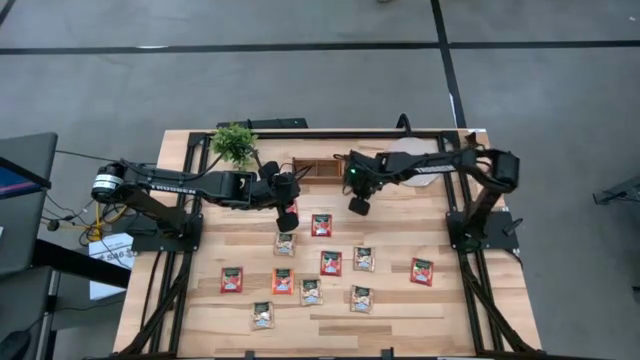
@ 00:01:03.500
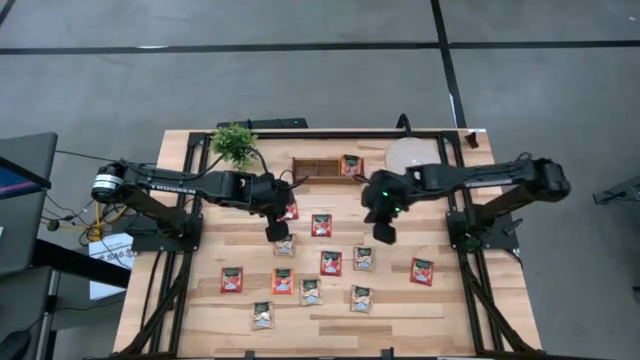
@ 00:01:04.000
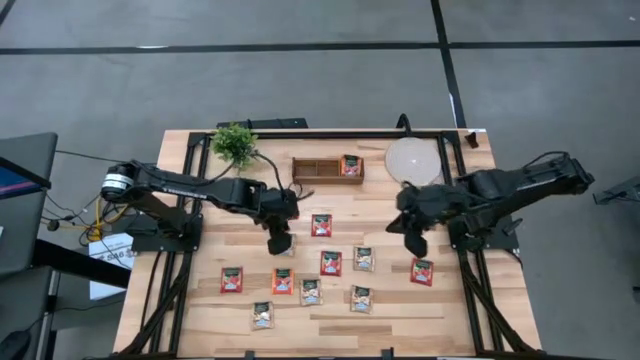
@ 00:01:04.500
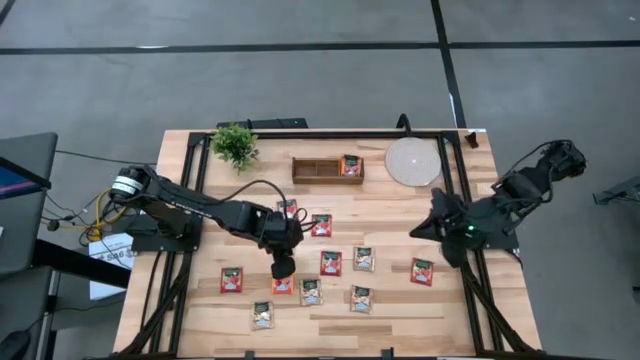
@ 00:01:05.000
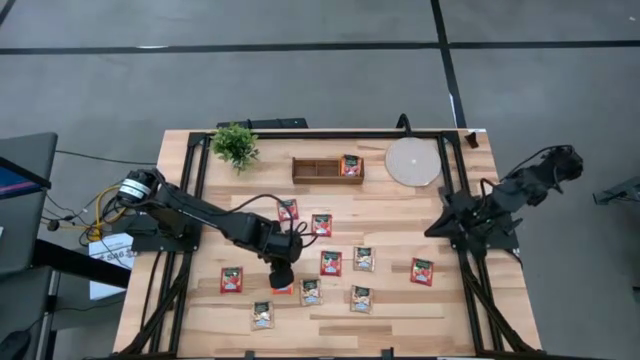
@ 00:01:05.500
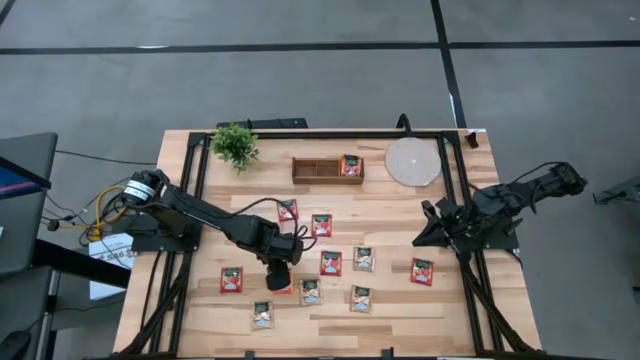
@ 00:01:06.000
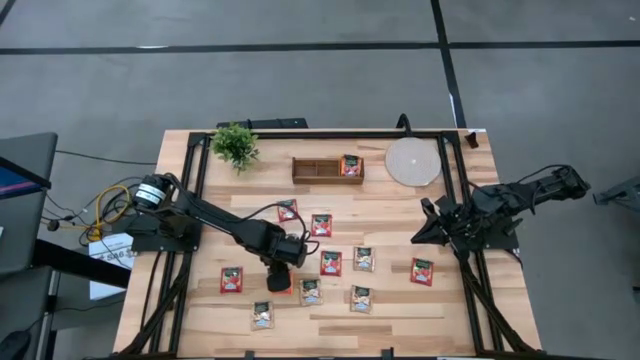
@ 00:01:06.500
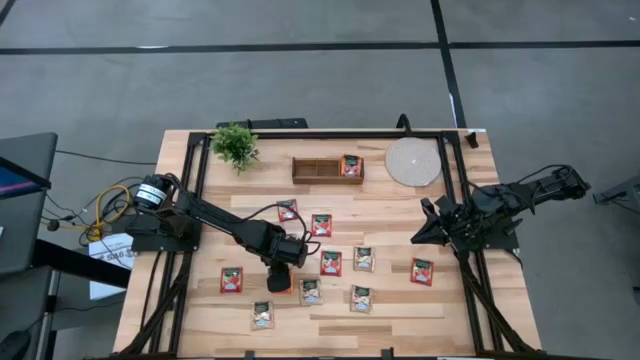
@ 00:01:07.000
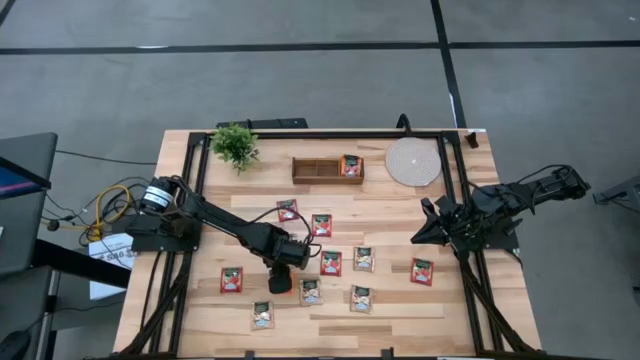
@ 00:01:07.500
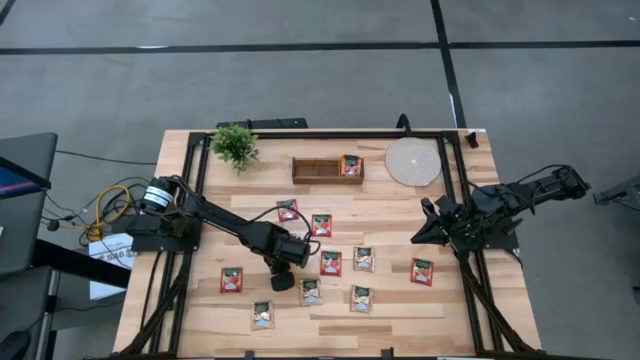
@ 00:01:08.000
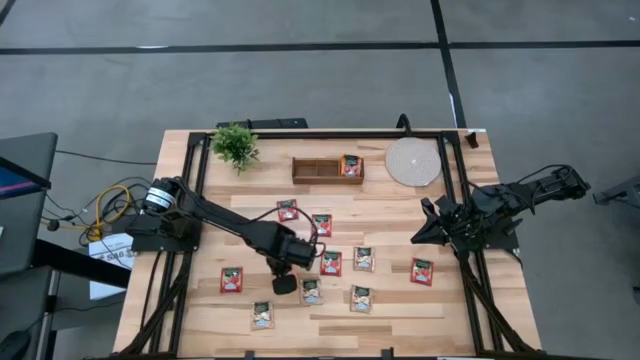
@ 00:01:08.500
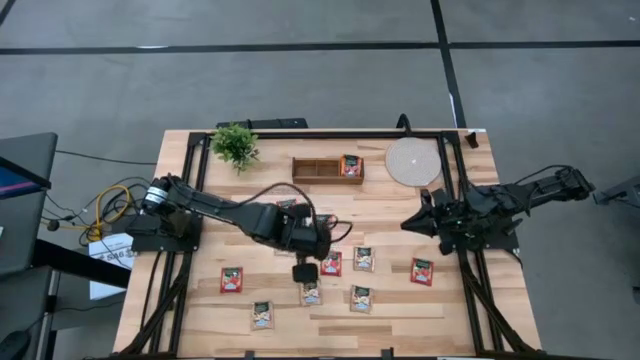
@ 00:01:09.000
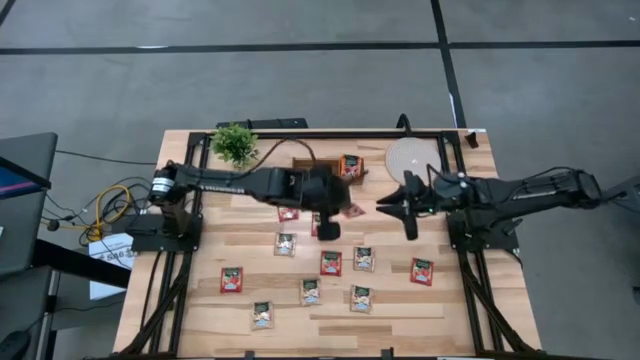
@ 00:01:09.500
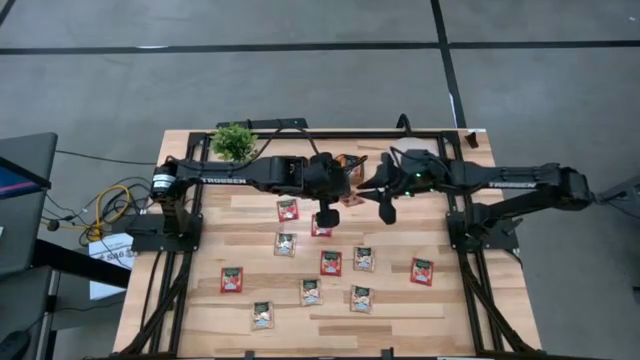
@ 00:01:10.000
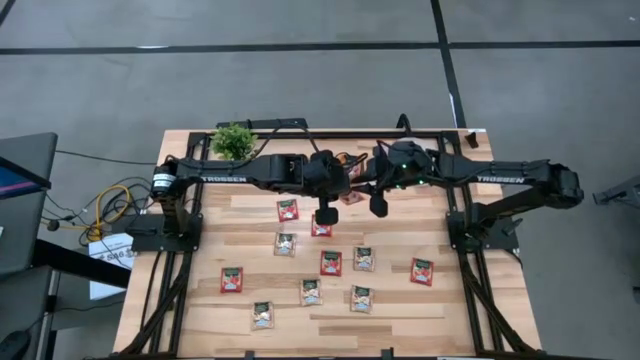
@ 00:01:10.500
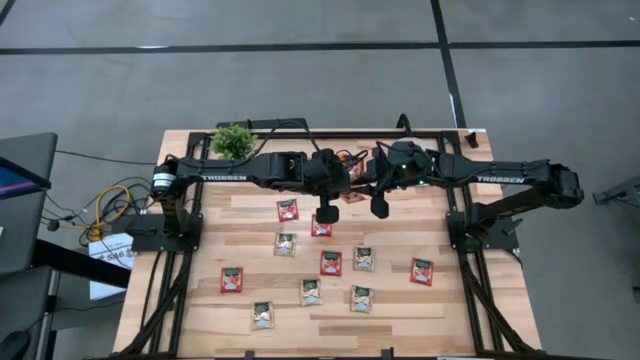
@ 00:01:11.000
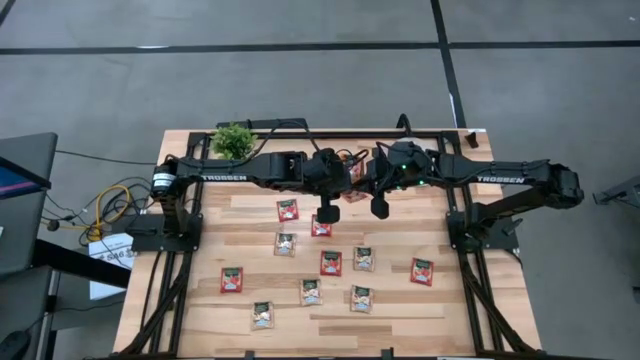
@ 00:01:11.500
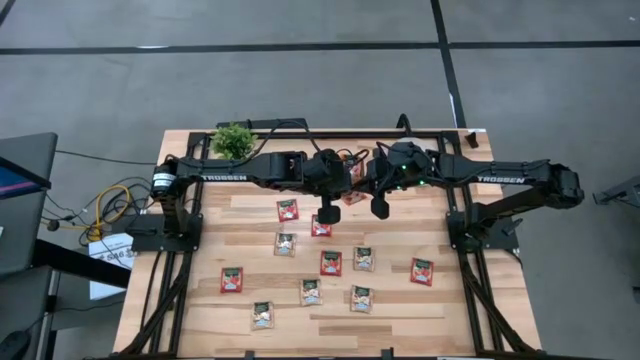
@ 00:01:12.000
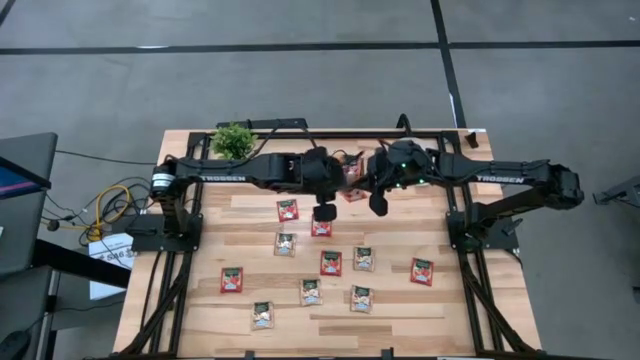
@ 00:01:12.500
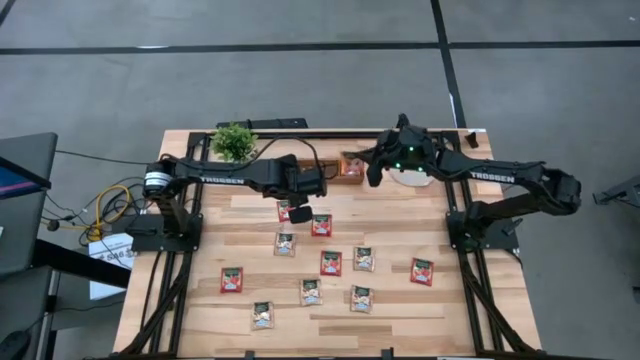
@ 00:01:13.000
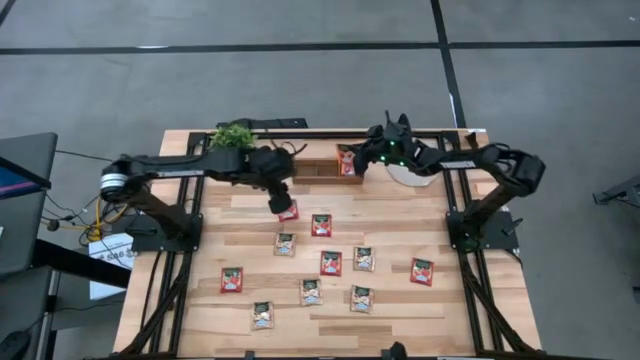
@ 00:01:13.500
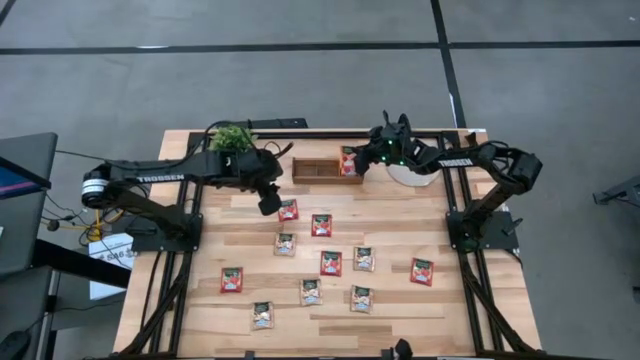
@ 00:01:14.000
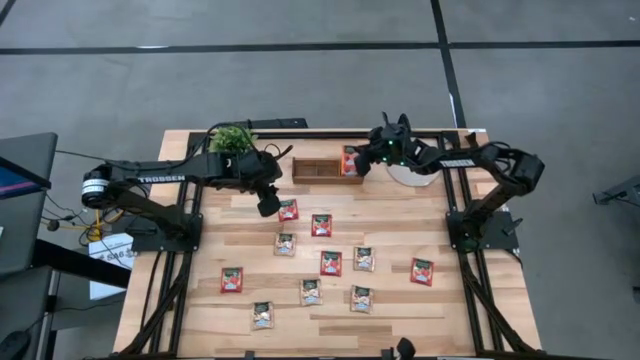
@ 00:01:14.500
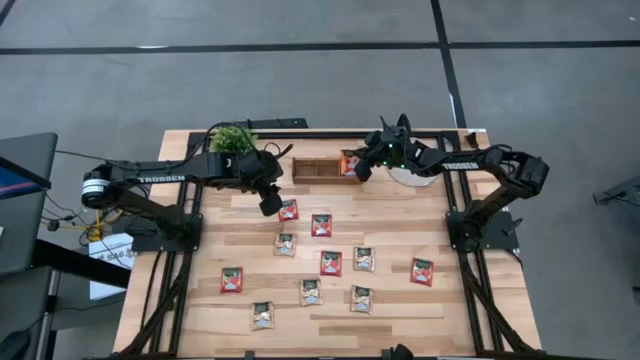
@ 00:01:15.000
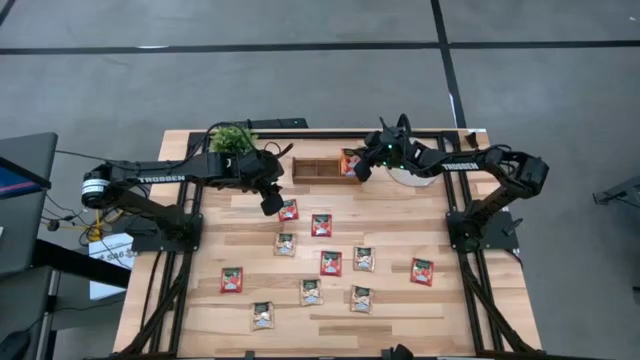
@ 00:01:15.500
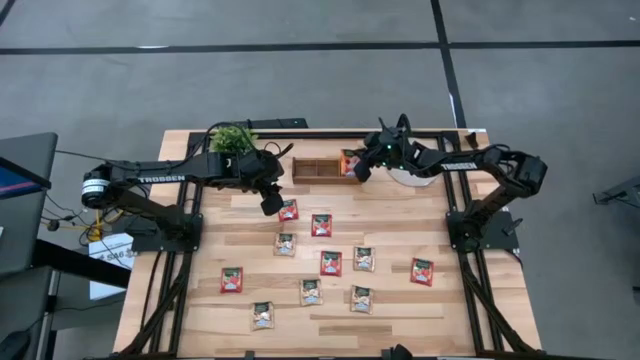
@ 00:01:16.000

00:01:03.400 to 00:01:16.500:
Task: Pick & Place Tea
Put the orange tea bag into the right section of the wooden organizer

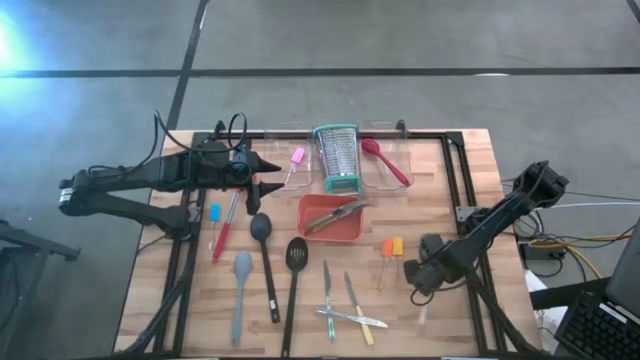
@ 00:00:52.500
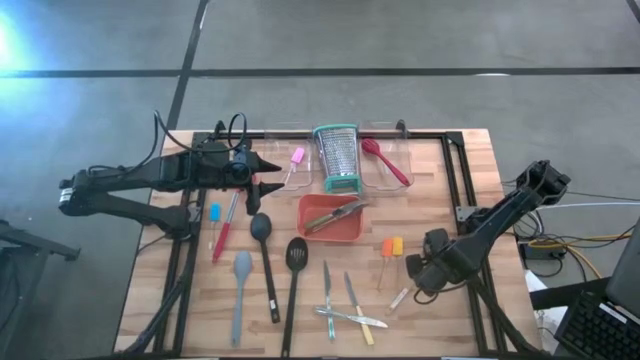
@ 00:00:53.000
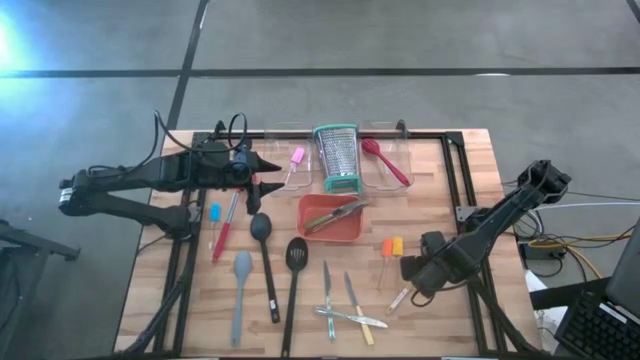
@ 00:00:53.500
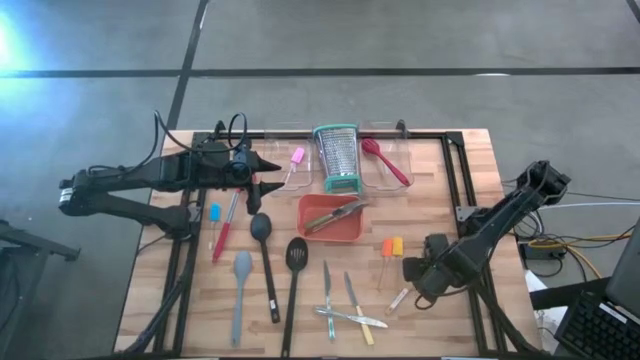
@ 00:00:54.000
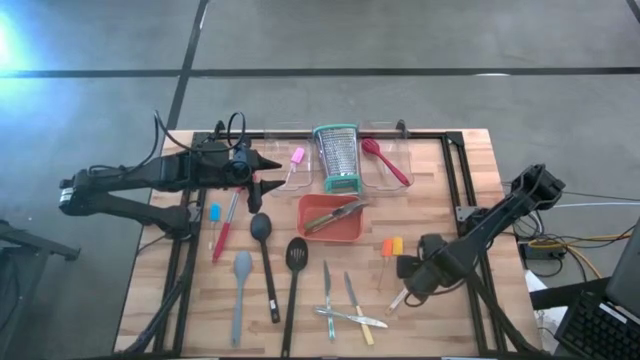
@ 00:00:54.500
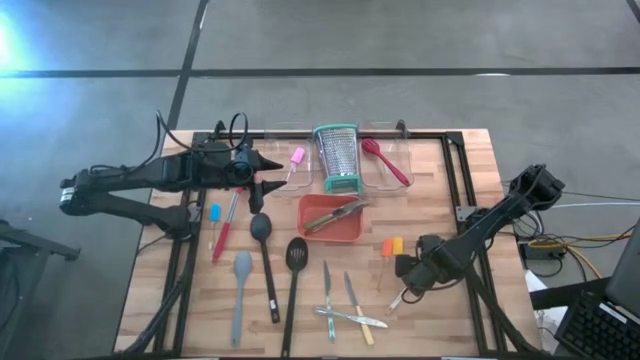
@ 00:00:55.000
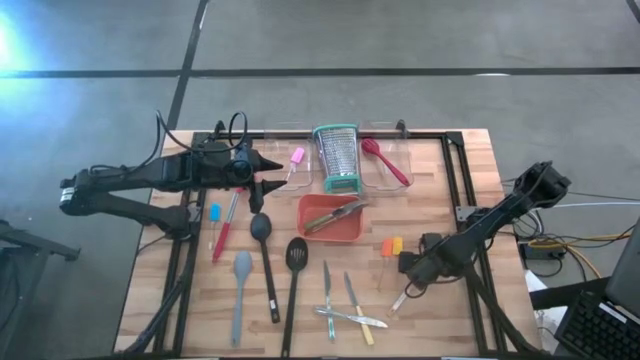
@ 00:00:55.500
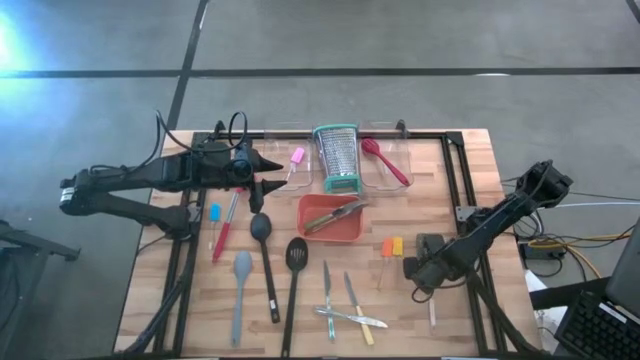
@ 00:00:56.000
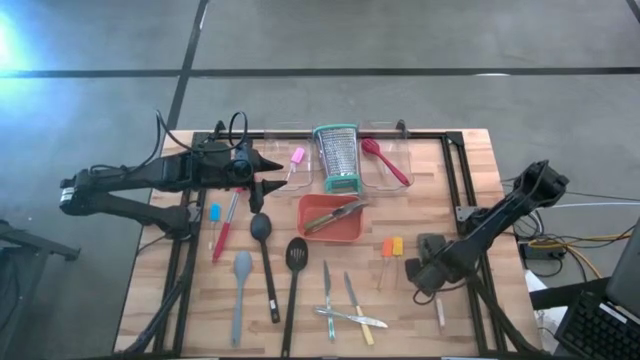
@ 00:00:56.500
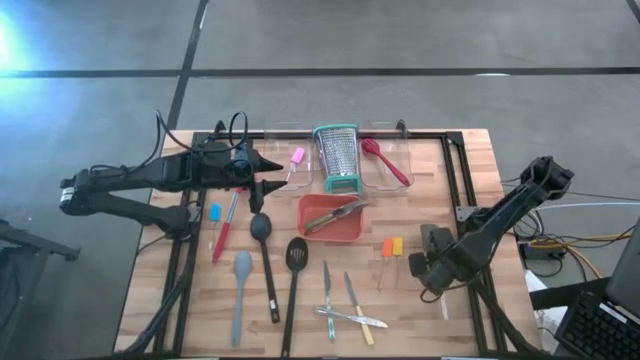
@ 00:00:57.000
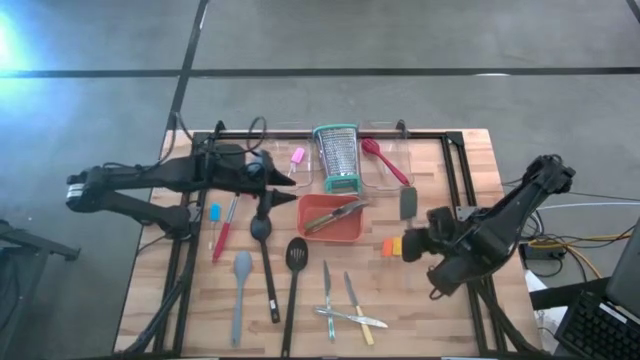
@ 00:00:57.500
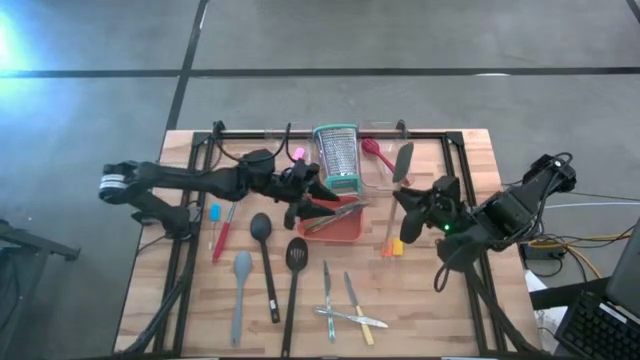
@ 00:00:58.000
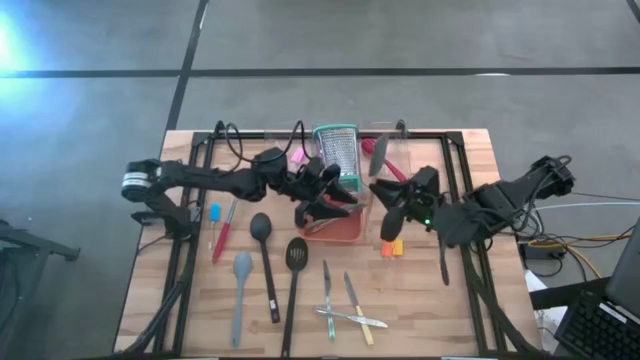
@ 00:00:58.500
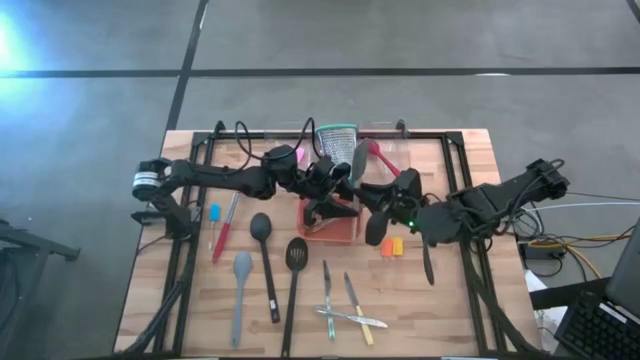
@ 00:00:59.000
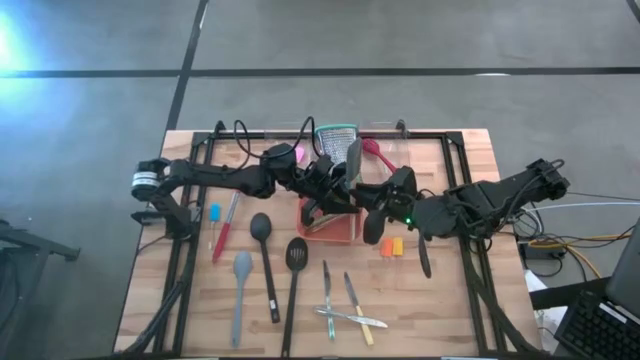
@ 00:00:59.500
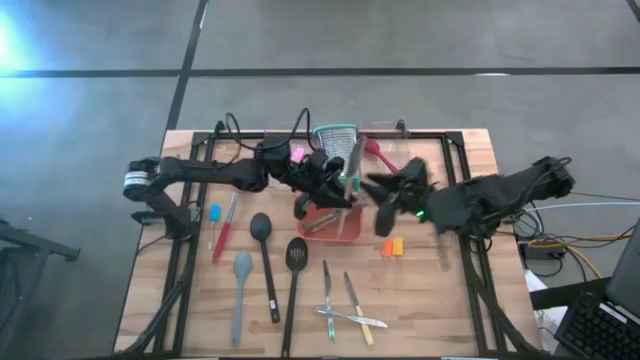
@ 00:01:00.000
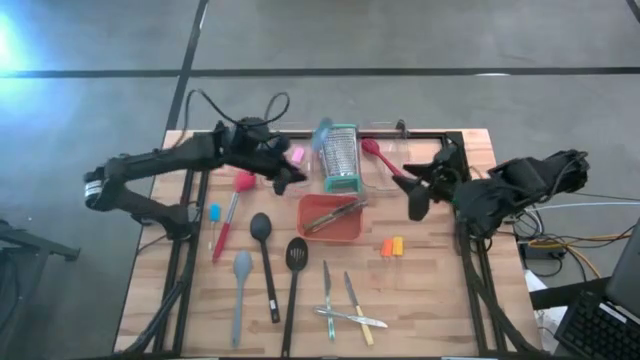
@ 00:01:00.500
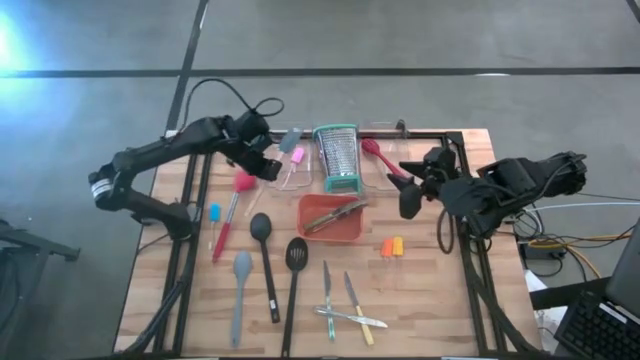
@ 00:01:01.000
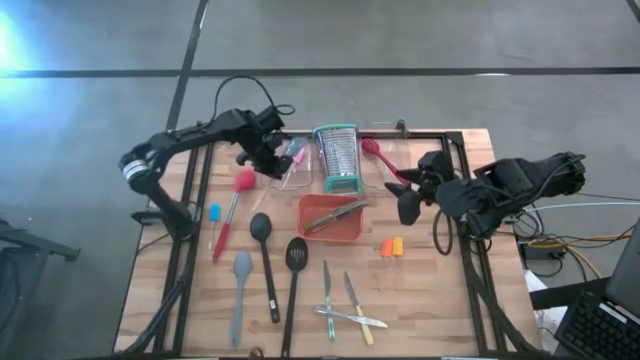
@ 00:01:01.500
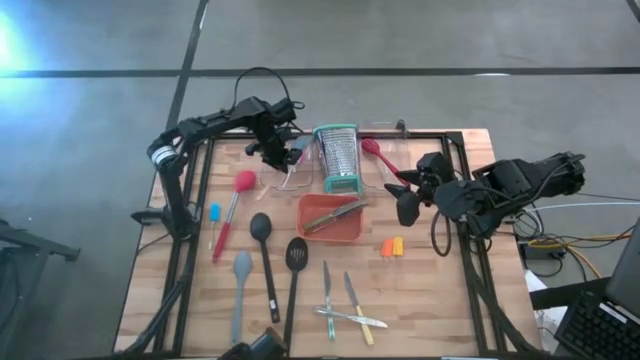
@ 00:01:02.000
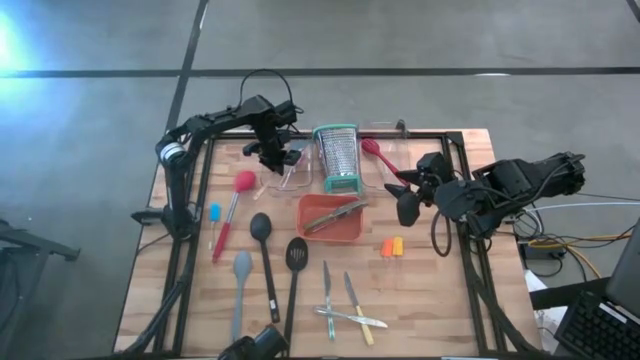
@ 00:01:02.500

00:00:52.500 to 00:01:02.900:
Task: Pick & Place Kitchen Items
Put the gray spatula into the left transparent bin
